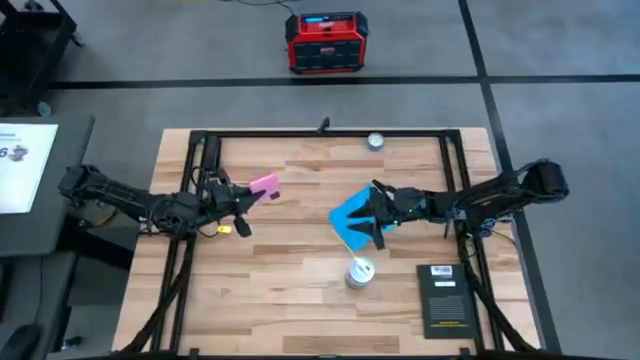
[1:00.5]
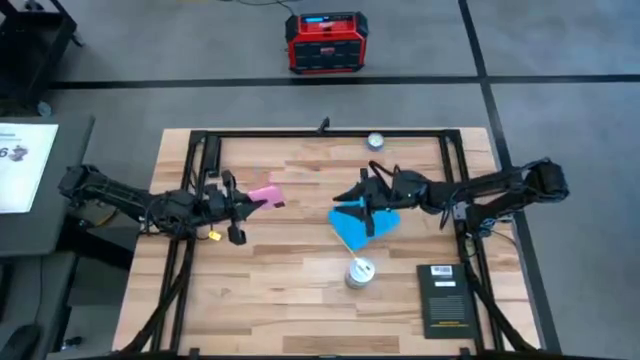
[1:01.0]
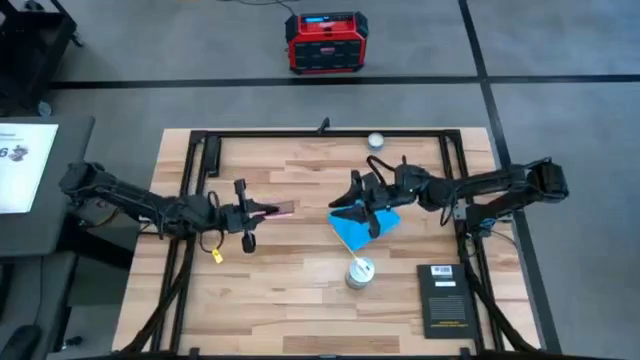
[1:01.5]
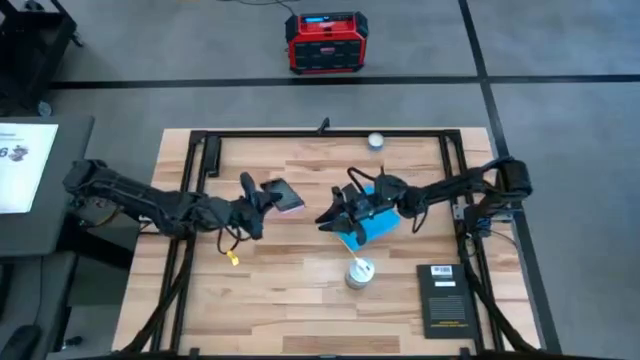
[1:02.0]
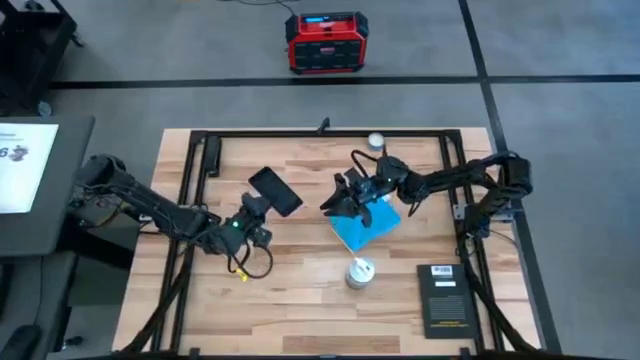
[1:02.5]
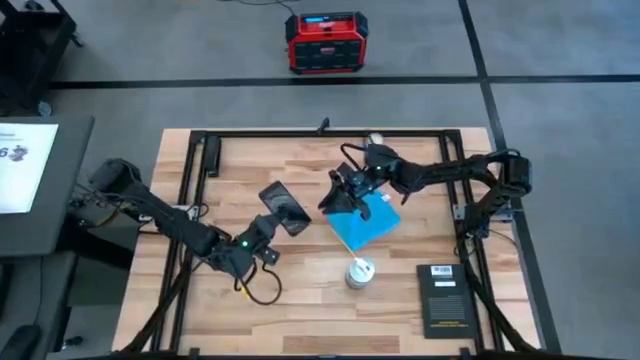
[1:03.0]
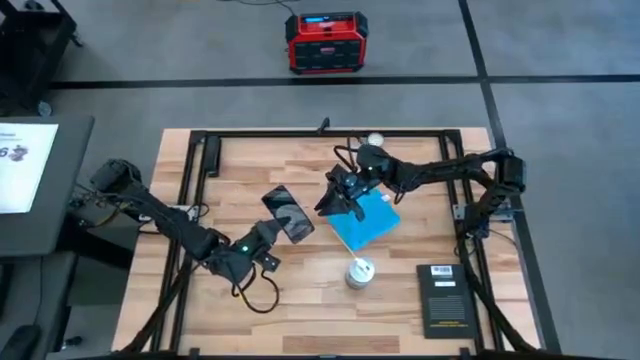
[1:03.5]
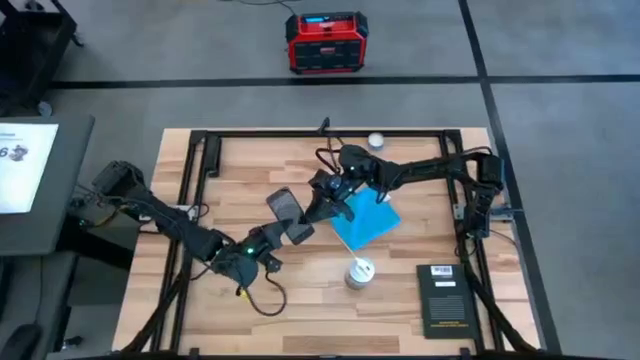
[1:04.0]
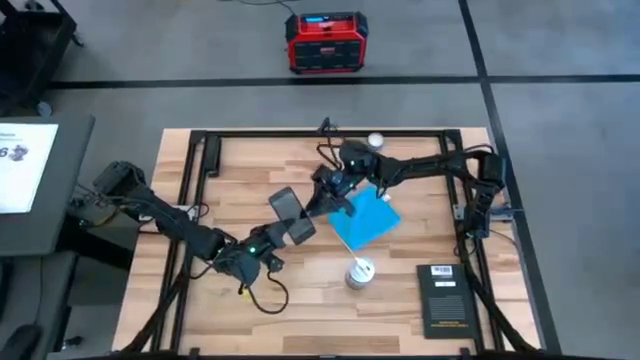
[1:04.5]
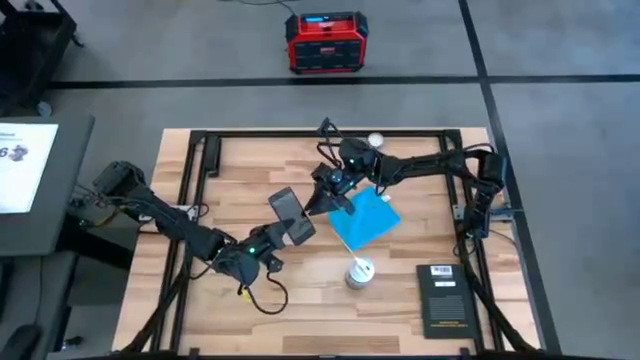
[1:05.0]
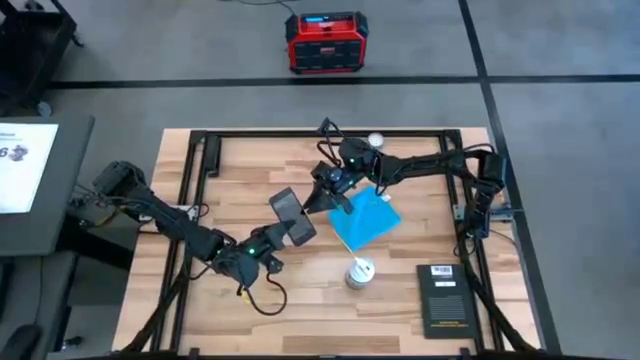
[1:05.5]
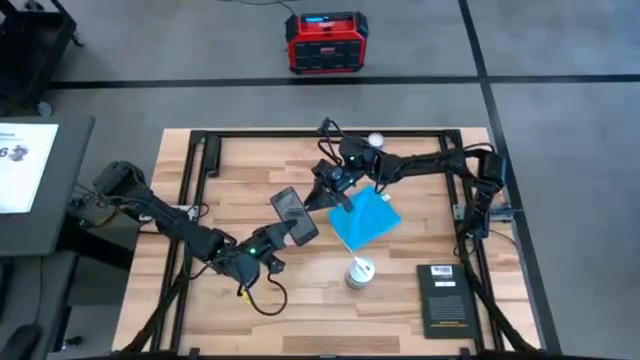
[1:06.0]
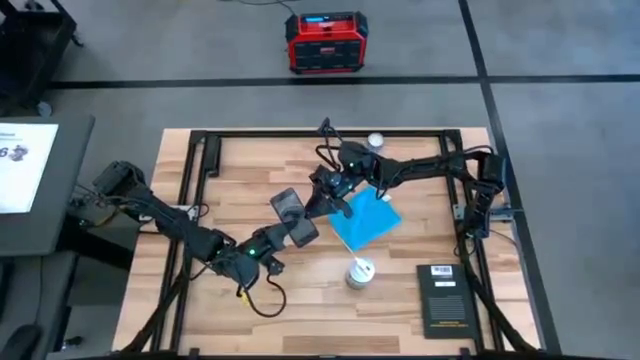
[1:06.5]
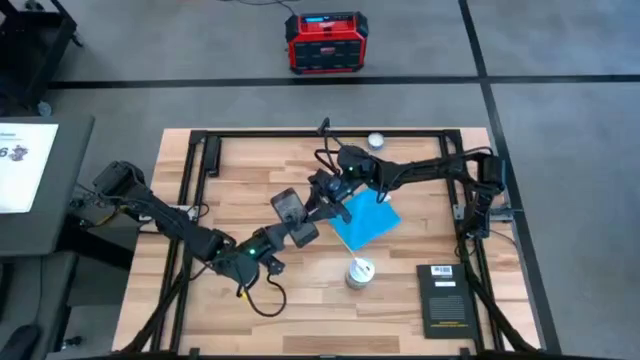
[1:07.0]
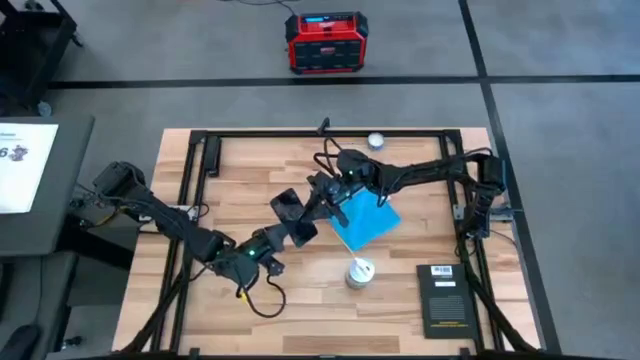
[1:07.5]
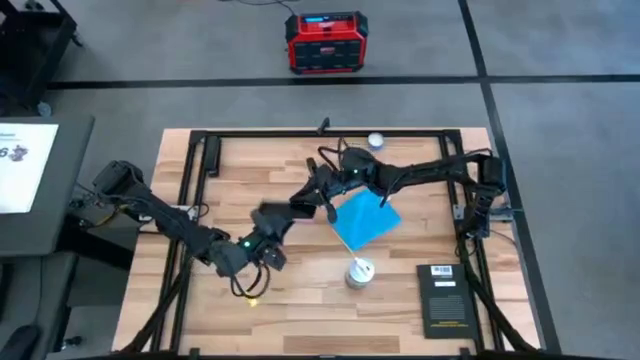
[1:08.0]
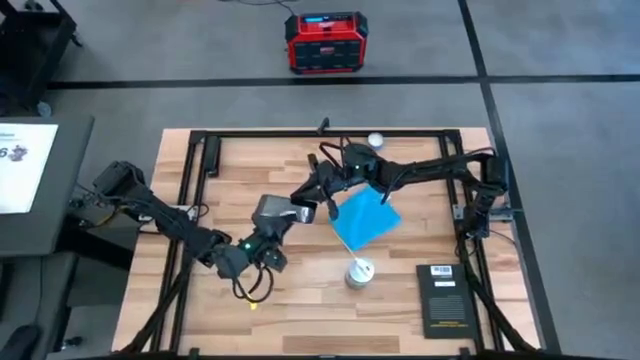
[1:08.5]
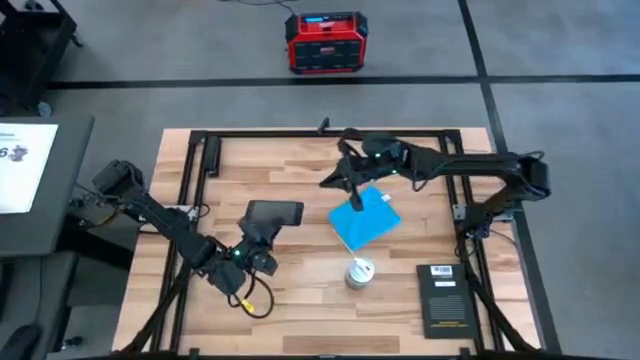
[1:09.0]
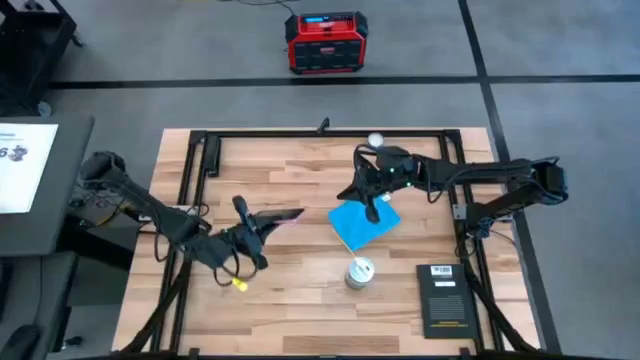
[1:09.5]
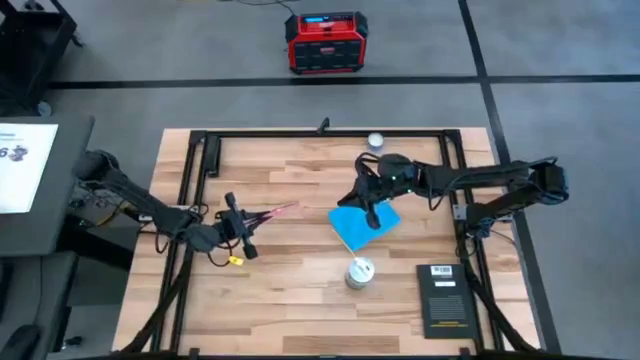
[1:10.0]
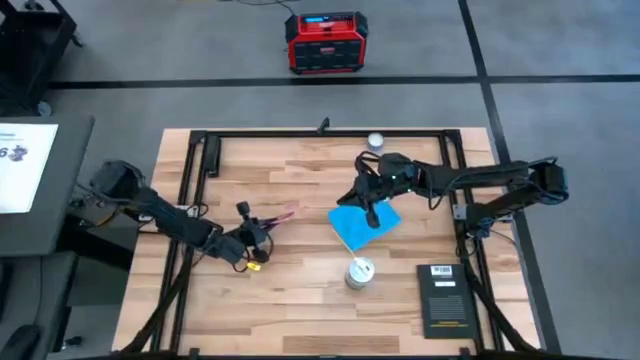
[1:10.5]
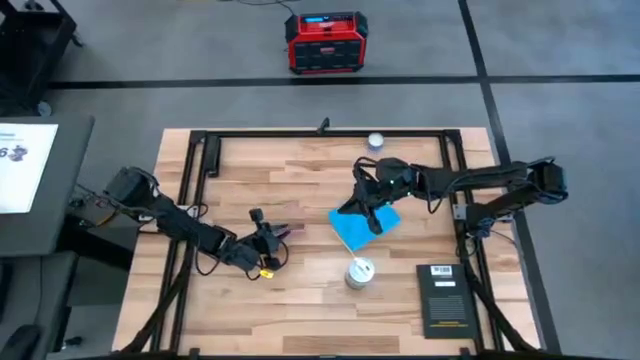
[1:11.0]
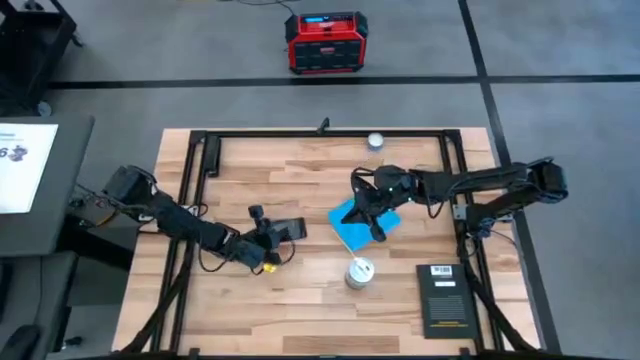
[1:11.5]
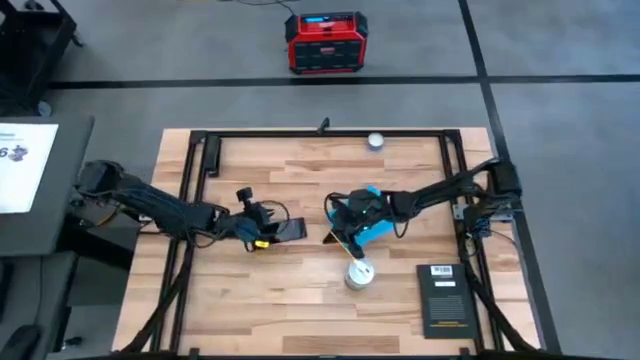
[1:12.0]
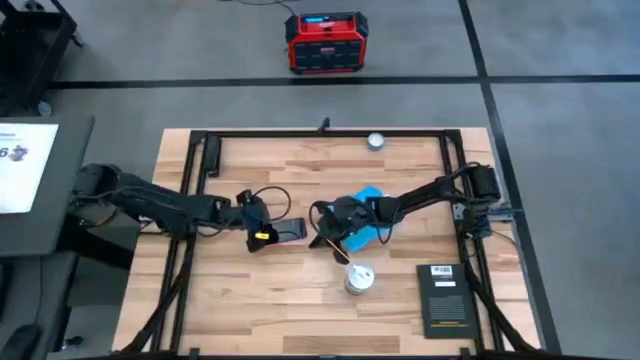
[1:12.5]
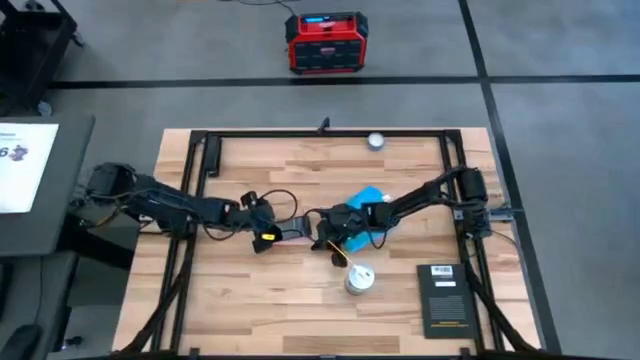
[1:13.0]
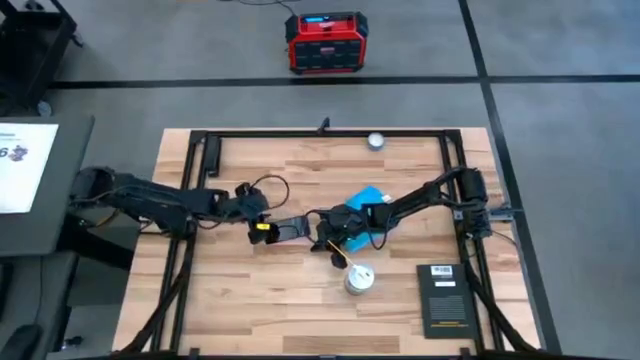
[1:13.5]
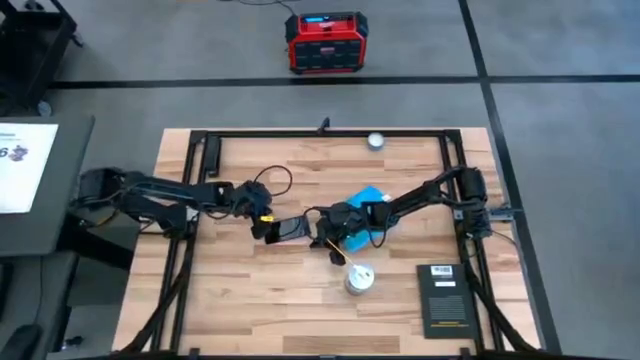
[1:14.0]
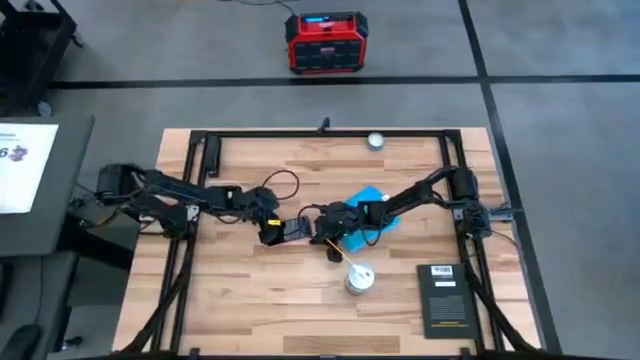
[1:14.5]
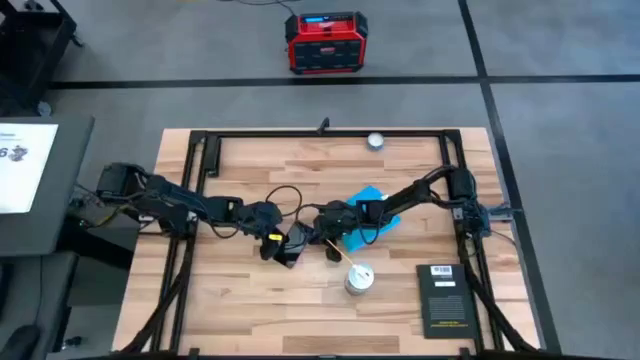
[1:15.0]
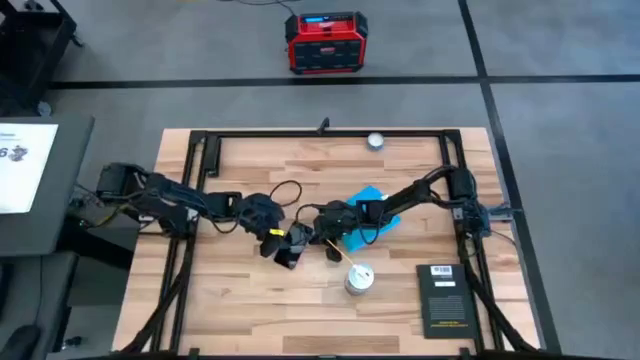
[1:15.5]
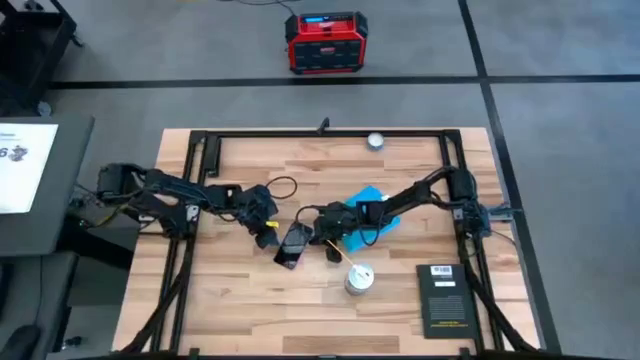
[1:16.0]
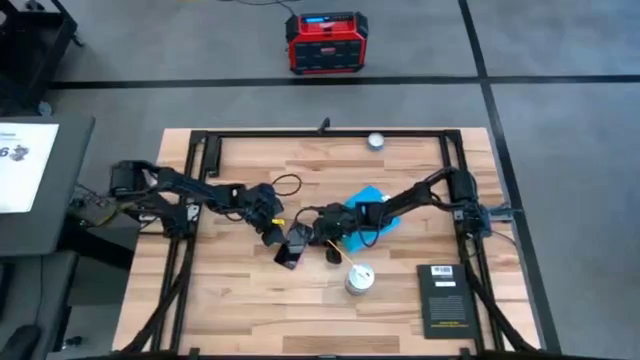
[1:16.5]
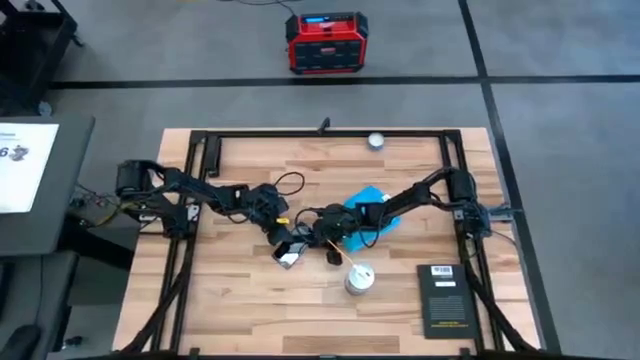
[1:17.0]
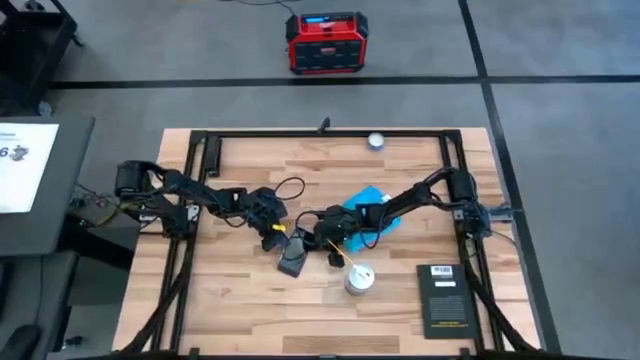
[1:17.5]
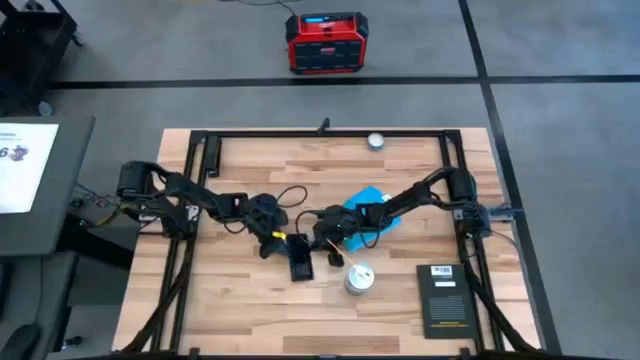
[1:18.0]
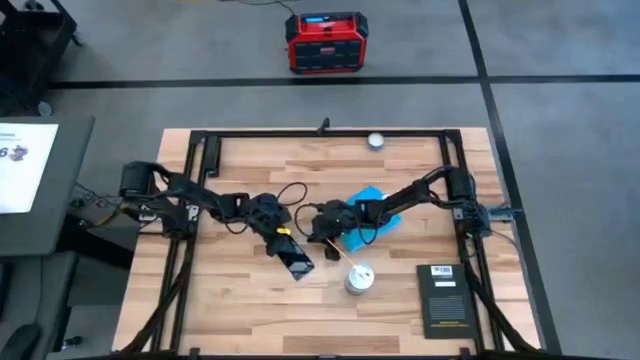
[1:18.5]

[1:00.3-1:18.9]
Task: Apply microfiber cloth
Spray the device using the spray bottle
